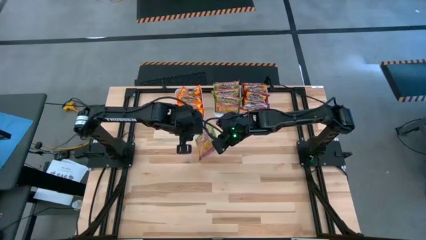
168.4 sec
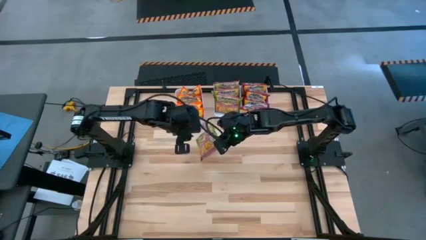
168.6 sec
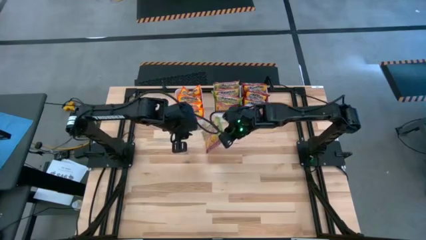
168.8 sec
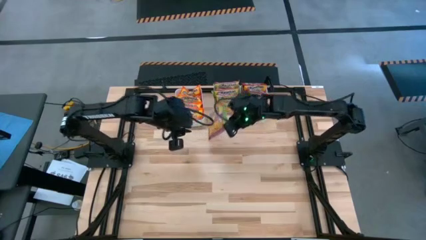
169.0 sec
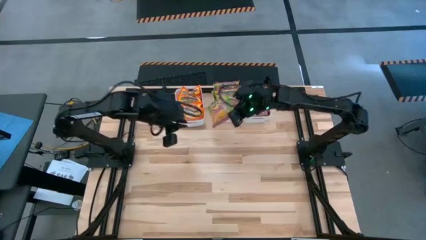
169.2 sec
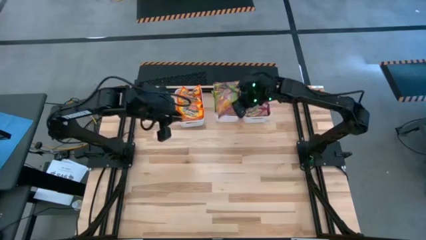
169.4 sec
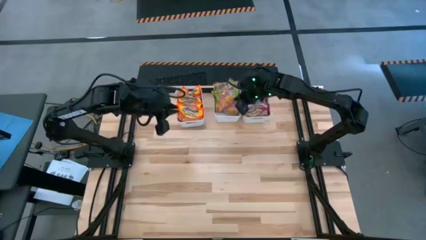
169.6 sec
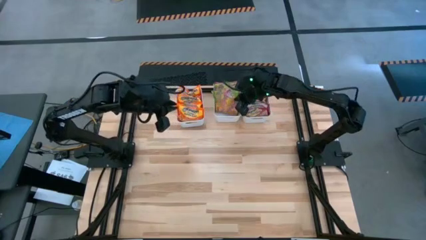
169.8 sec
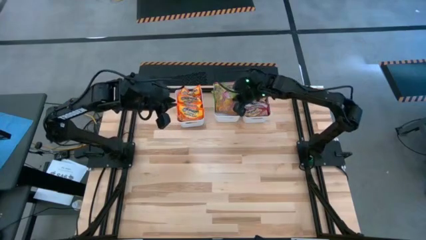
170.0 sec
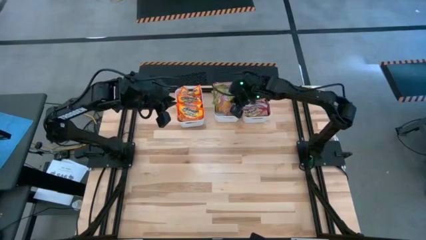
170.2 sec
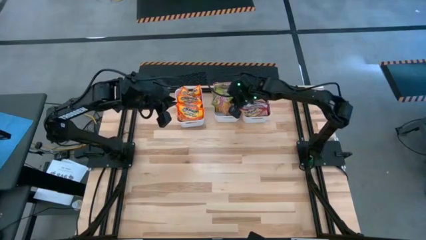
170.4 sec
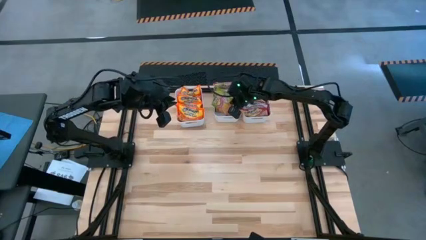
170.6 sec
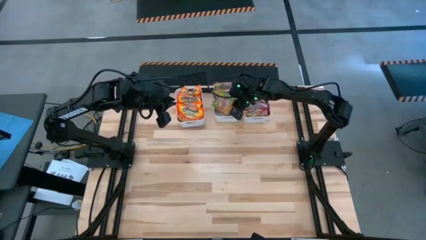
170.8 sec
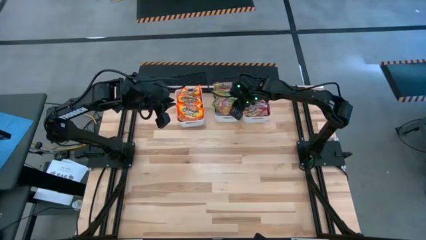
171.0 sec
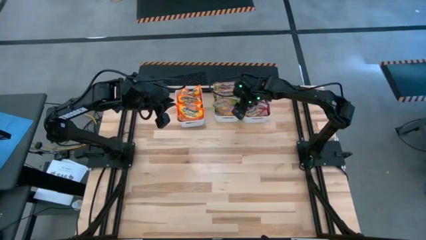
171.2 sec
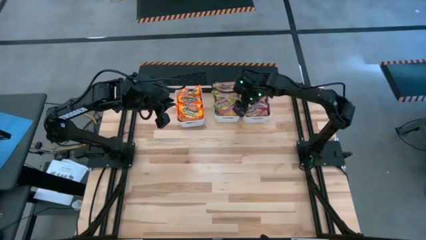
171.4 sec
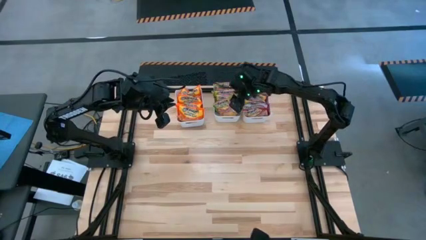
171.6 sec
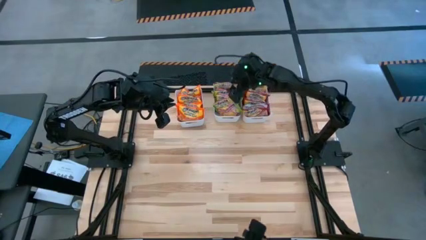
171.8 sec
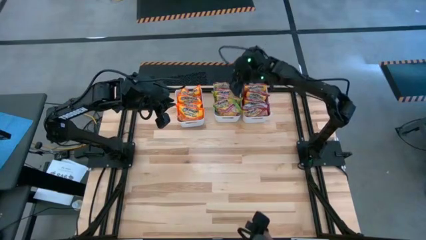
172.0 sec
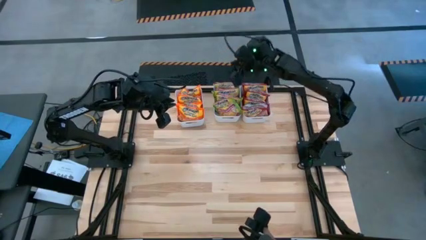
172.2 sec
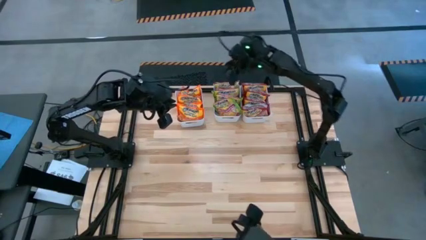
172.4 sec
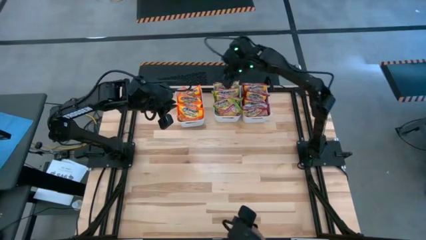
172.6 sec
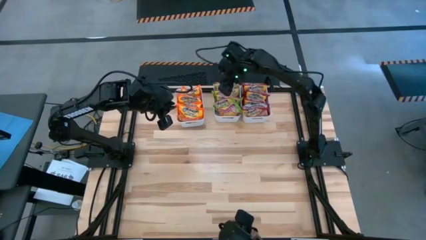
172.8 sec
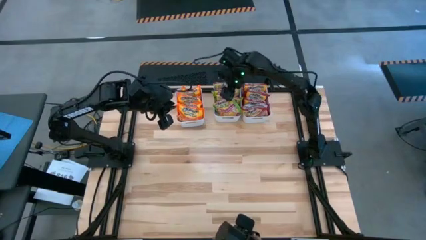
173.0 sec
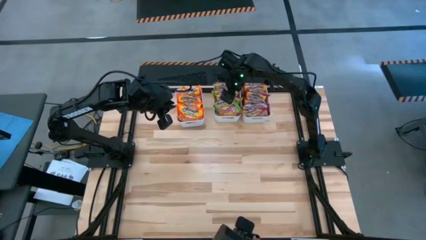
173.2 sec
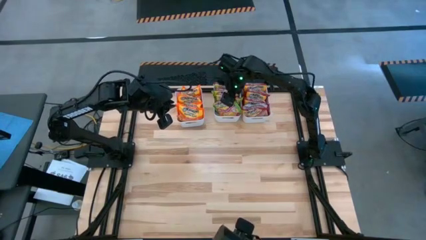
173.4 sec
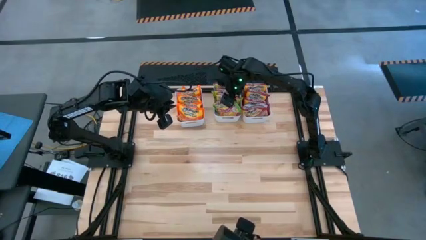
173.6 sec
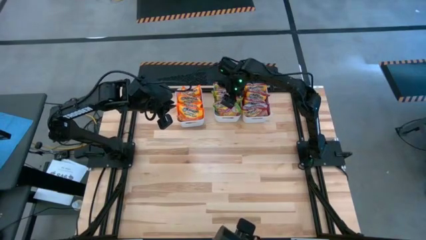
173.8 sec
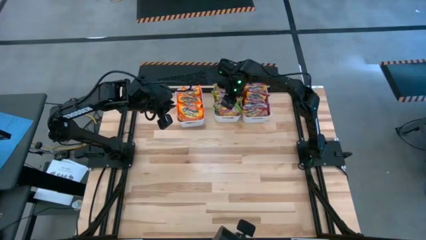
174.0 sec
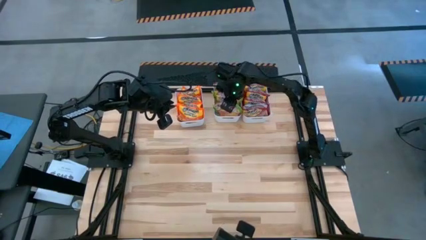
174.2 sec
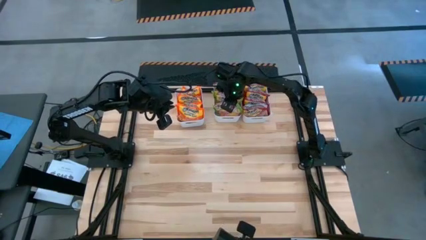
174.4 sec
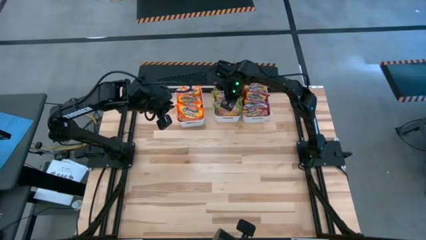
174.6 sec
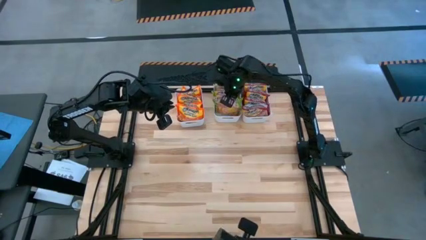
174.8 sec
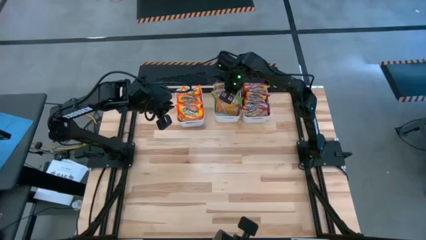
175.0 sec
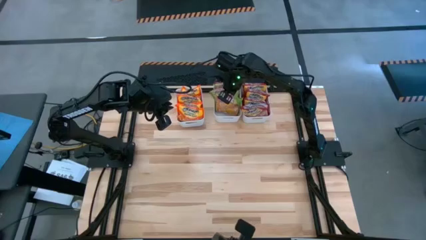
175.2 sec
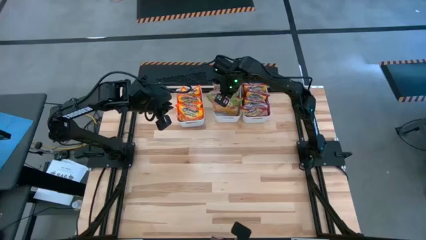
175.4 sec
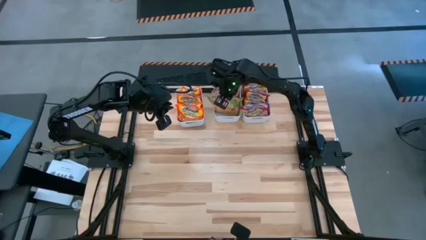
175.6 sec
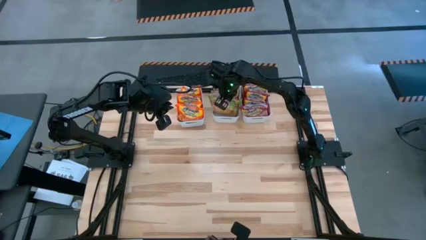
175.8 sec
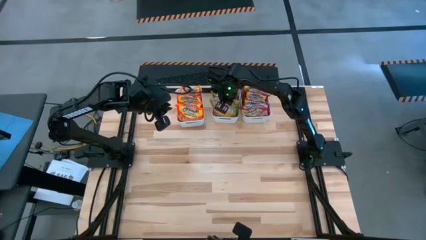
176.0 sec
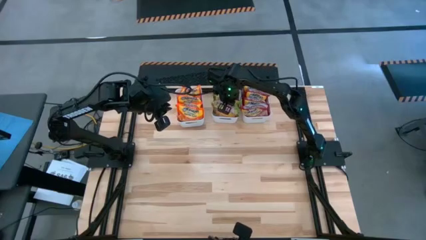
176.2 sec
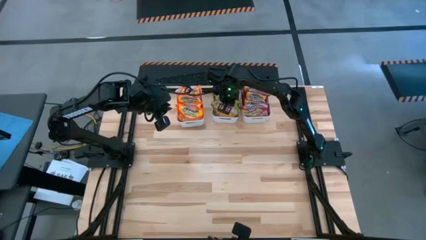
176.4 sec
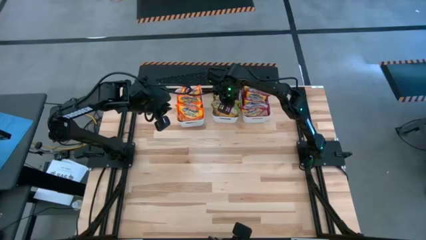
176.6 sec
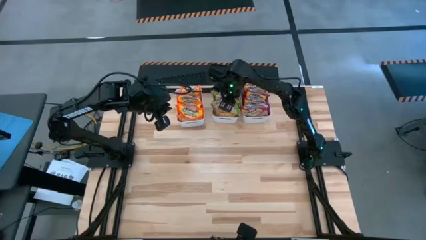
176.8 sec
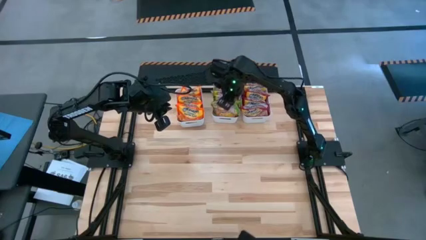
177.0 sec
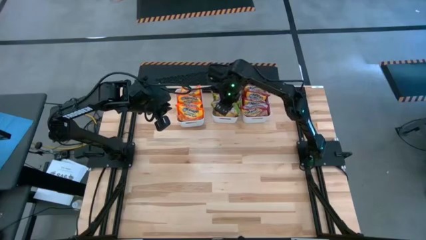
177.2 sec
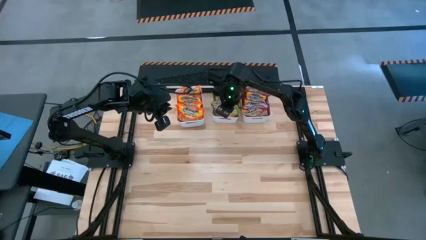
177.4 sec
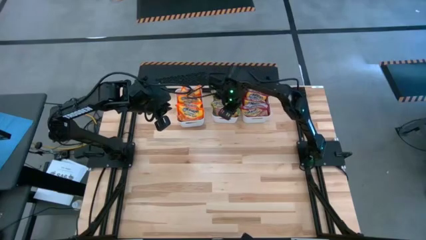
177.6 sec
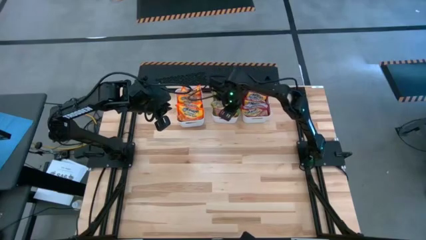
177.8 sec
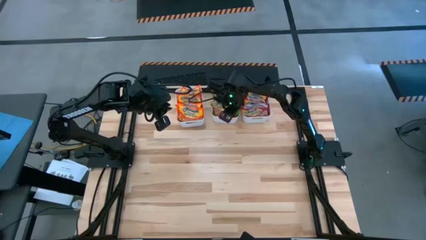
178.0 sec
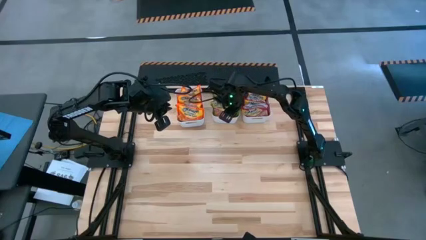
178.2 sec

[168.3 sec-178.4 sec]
Task: Sort Maruchan noodles
Put the green noodle pack into the center white bin

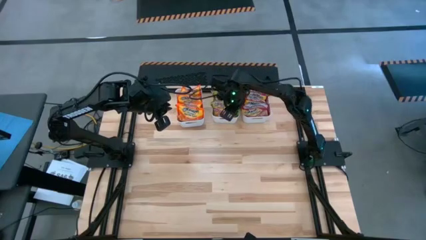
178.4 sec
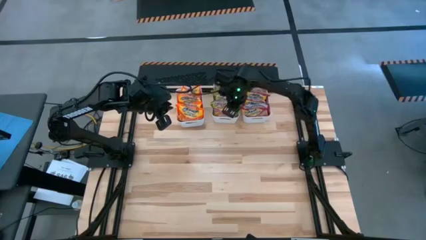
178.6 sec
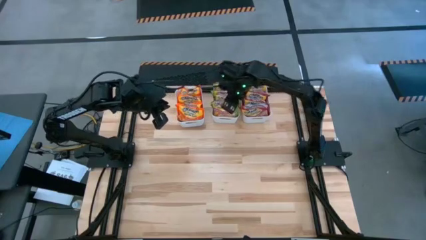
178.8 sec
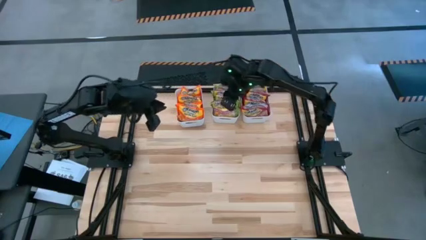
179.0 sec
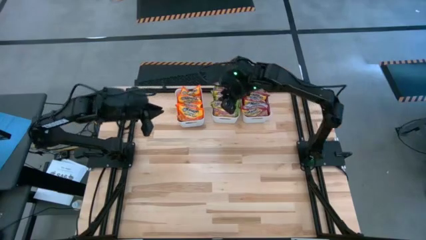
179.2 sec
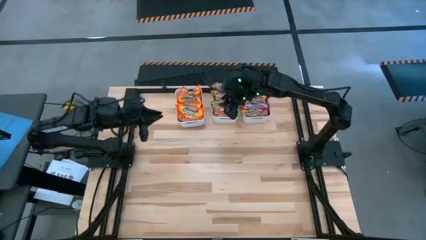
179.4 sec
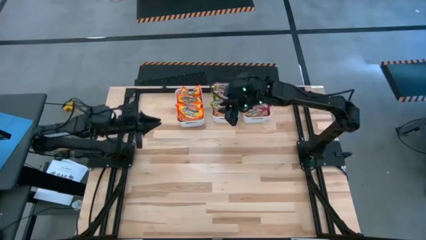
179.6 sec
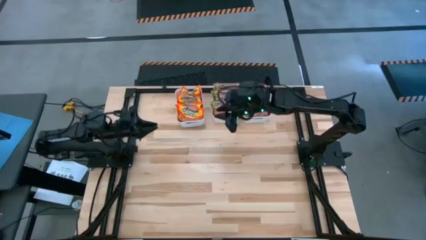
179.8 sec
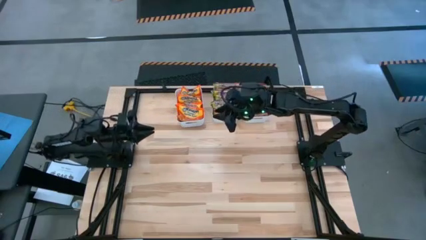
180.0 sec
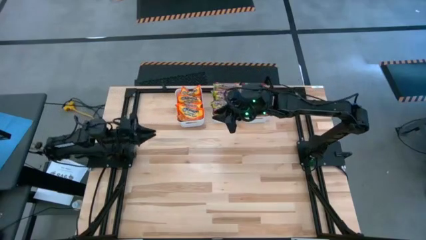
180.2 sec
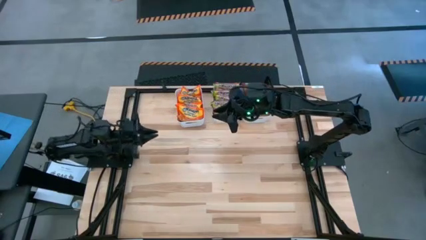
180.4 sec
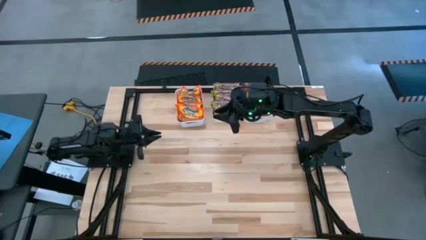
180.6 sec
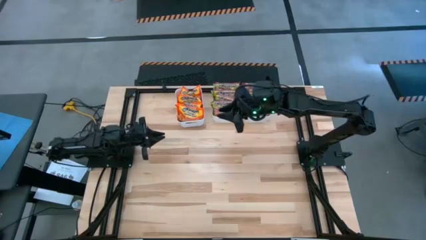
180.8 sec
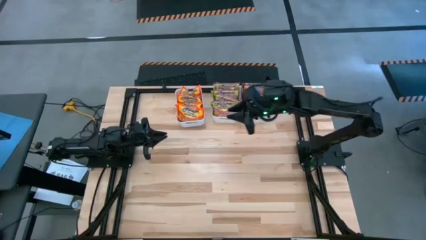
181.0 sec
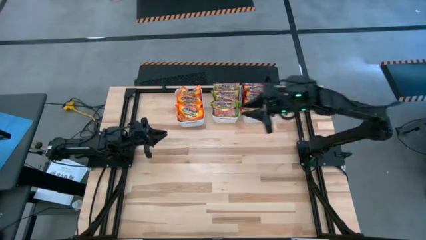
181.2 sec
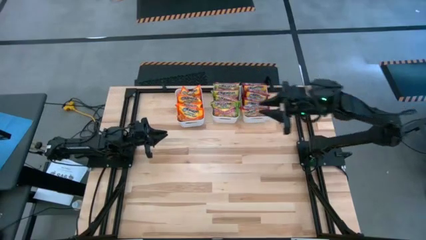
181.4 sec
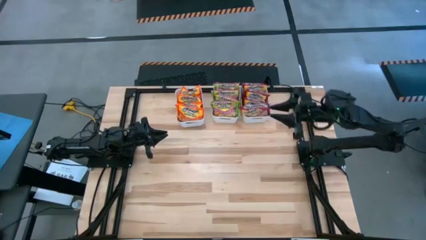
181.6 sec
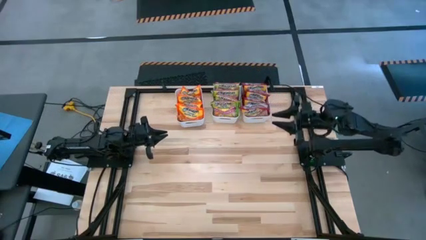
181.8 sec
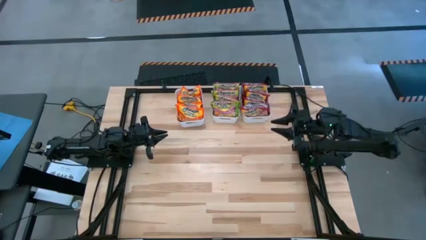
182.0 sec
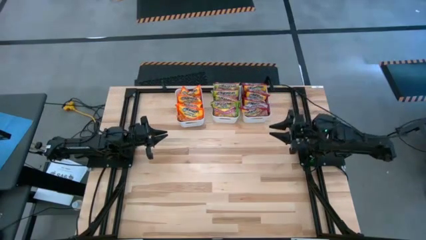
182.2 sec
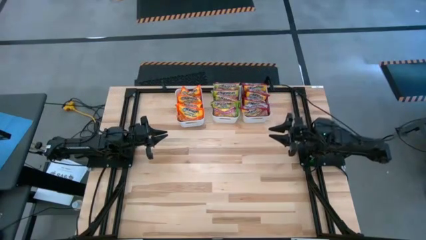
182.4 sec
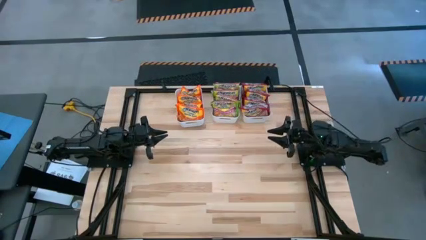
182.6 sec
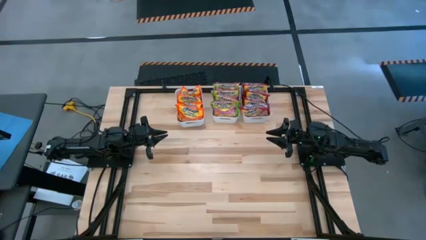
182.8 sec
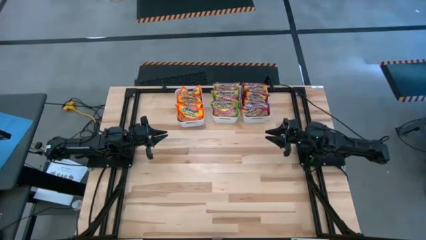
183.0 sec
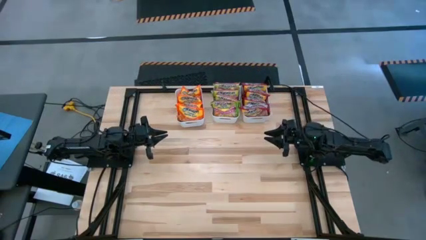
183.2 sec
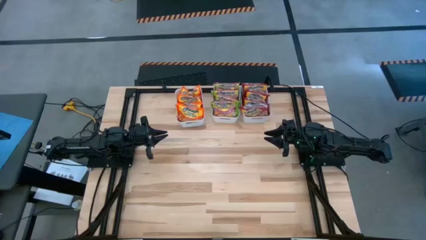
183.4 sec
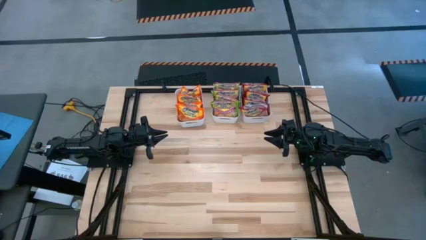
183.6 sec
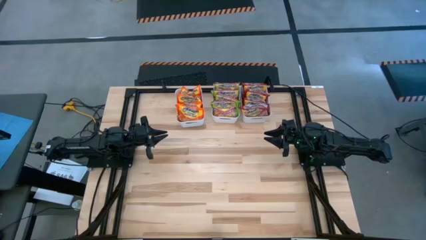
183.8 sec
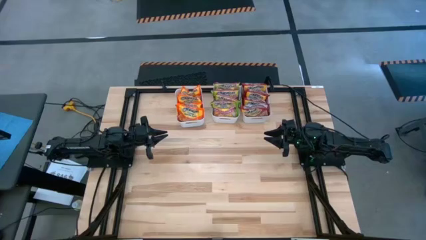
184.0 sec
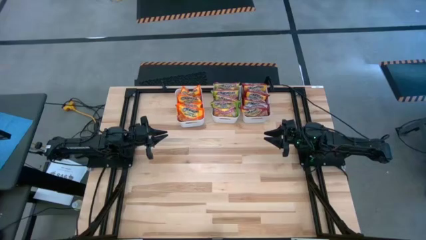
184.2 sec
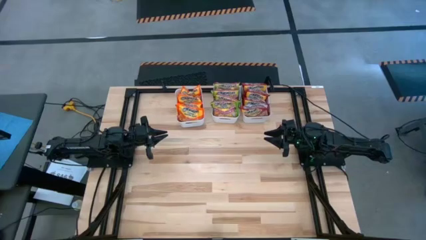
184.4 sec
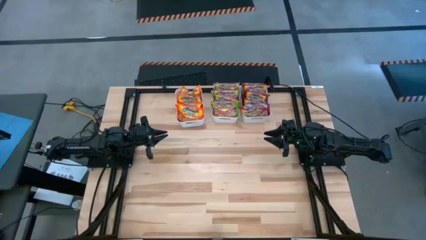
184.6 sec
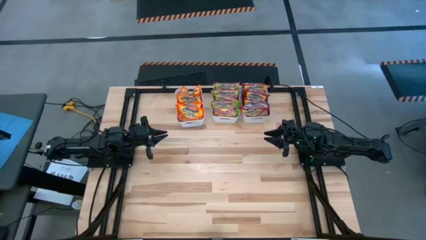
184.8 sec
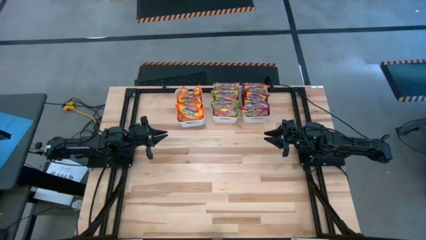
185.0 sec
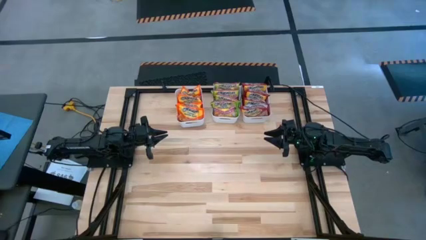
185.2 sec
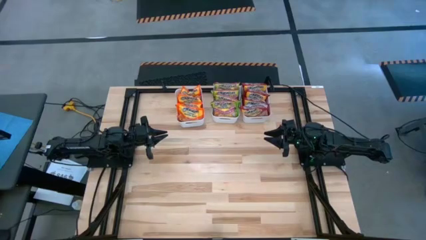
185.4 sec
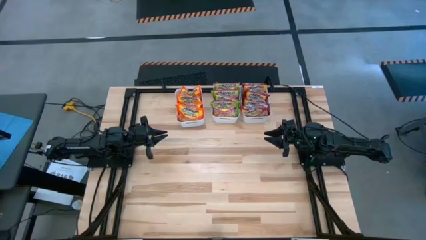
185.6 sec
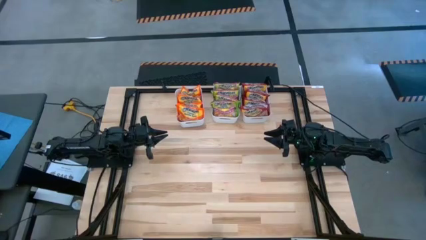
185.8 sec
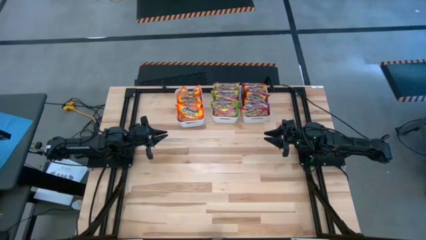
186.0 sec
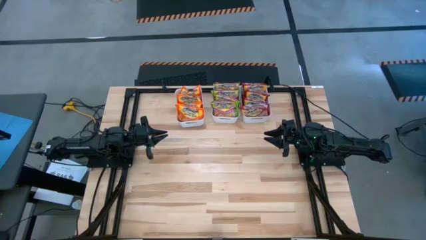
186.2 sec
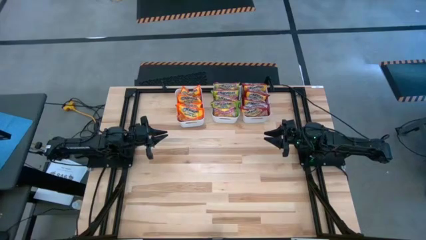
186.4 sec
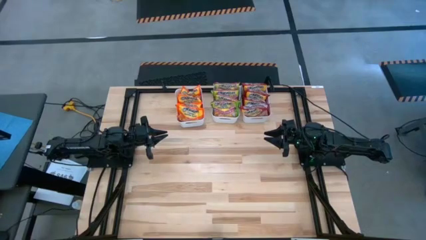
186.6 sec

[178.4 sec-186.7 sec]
Return to Home Position
